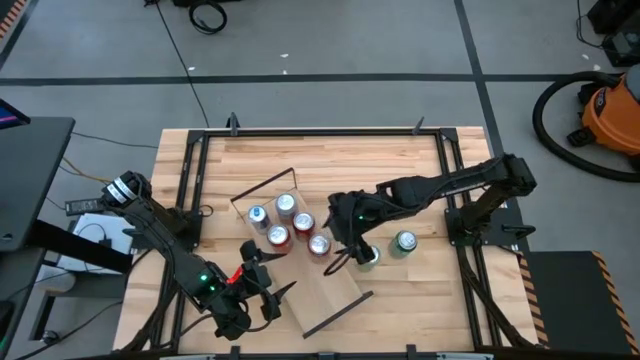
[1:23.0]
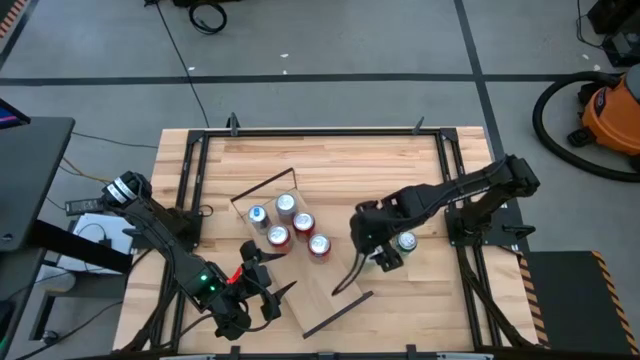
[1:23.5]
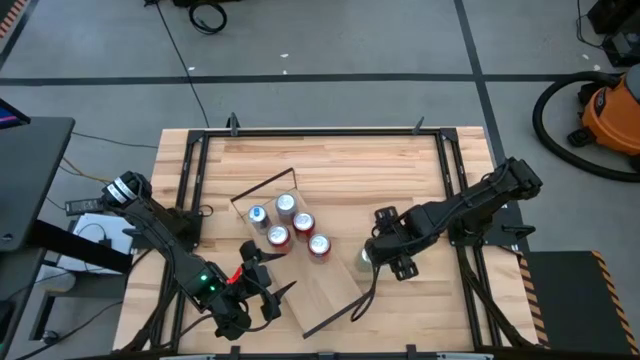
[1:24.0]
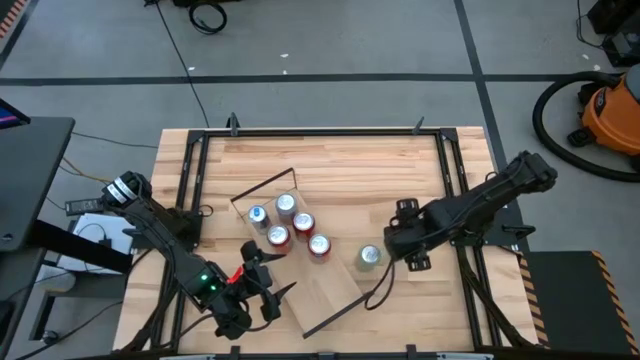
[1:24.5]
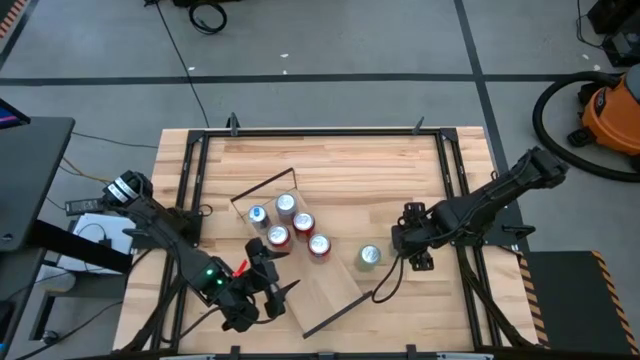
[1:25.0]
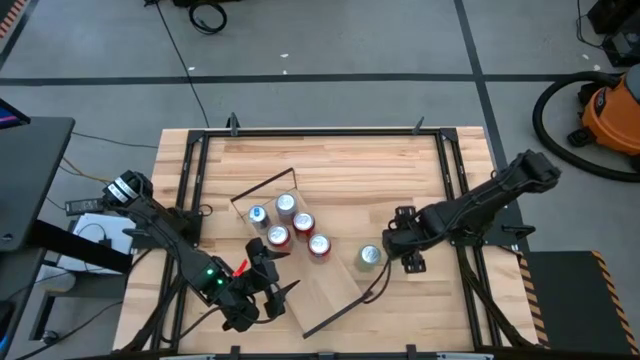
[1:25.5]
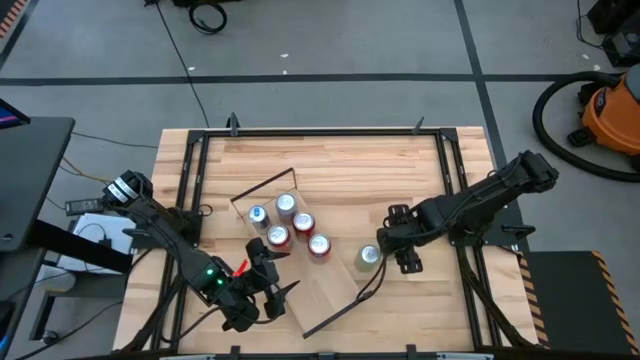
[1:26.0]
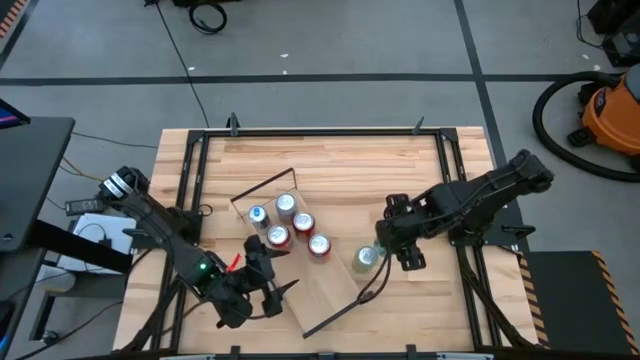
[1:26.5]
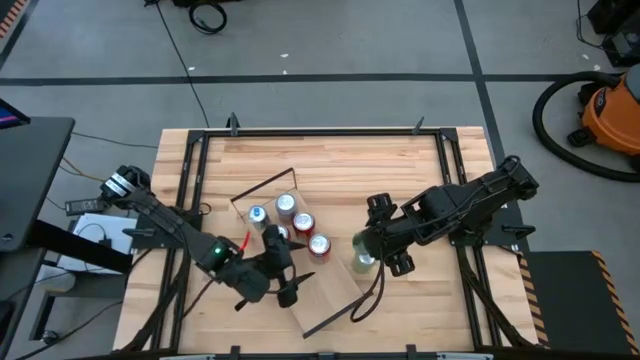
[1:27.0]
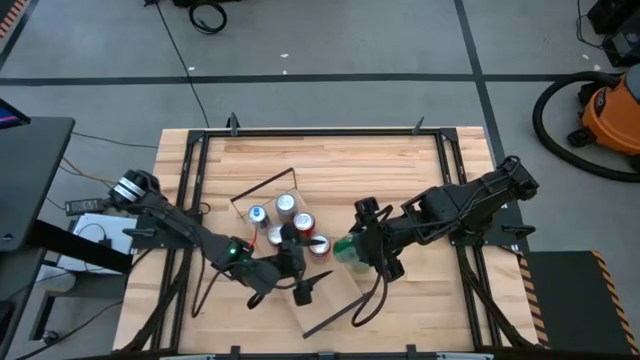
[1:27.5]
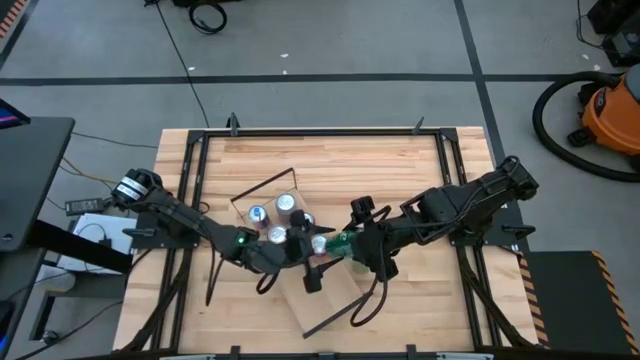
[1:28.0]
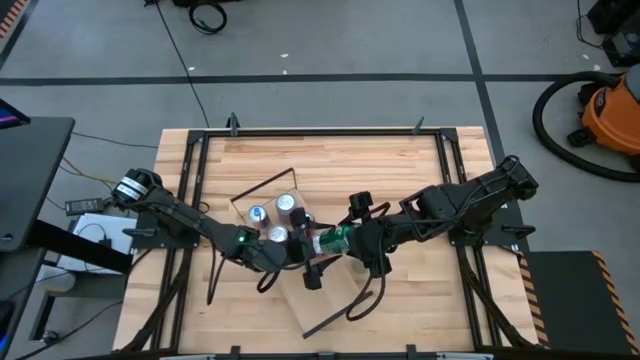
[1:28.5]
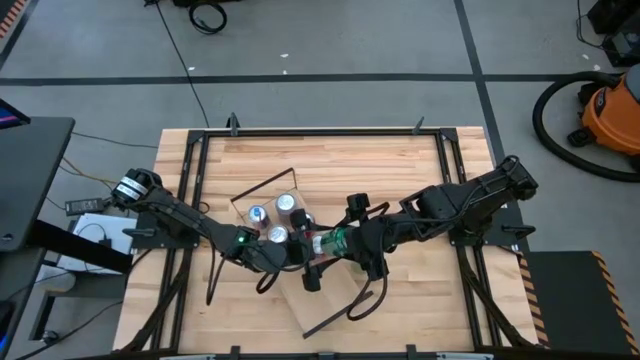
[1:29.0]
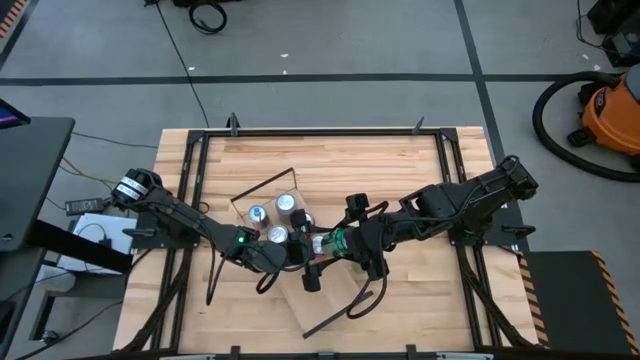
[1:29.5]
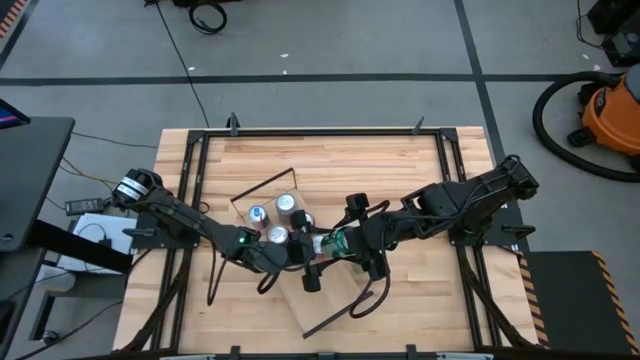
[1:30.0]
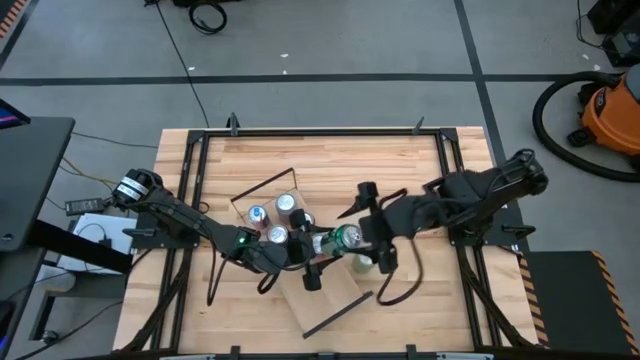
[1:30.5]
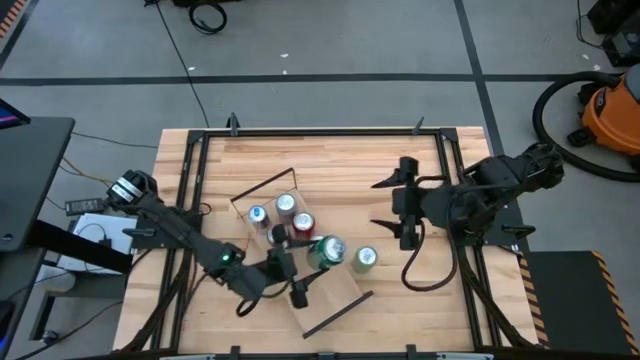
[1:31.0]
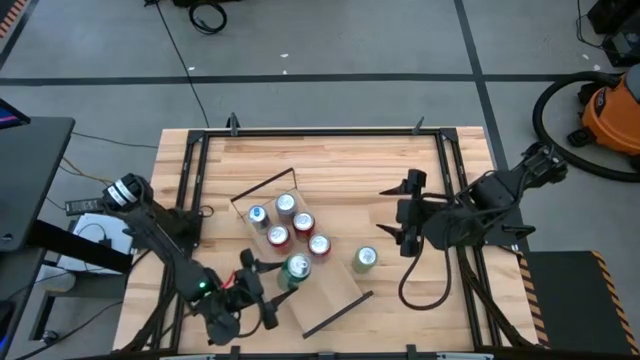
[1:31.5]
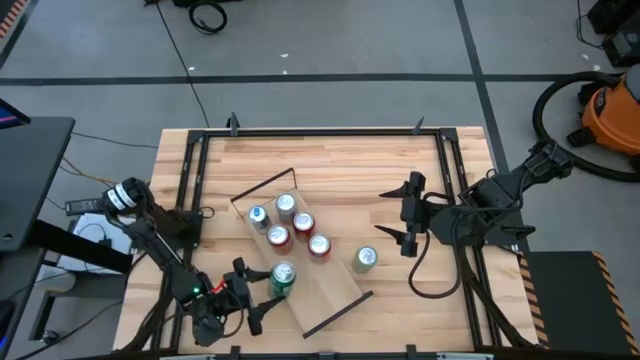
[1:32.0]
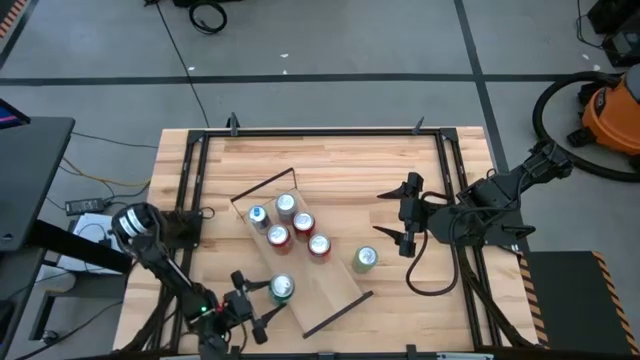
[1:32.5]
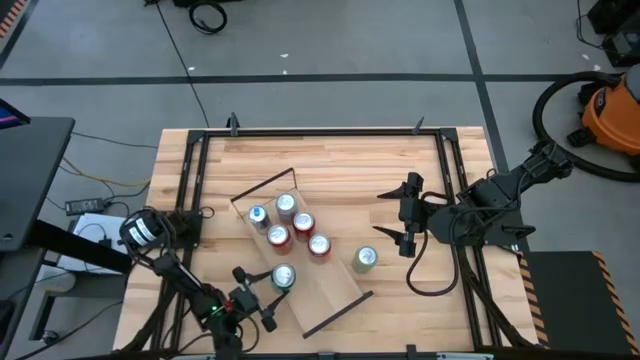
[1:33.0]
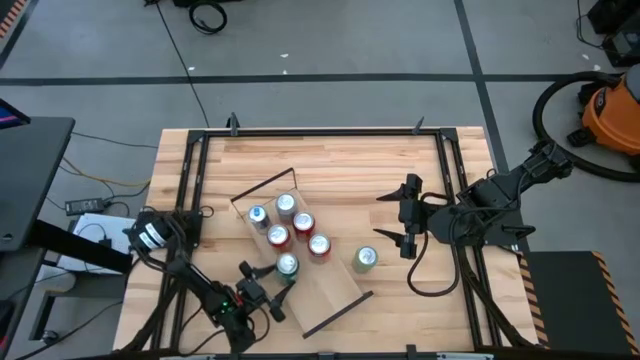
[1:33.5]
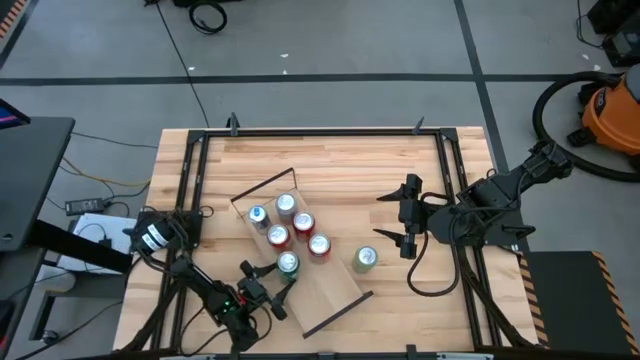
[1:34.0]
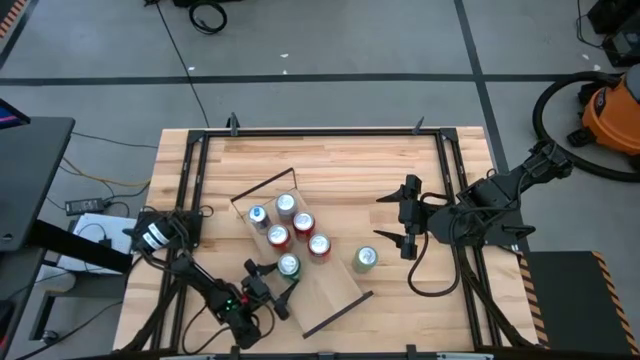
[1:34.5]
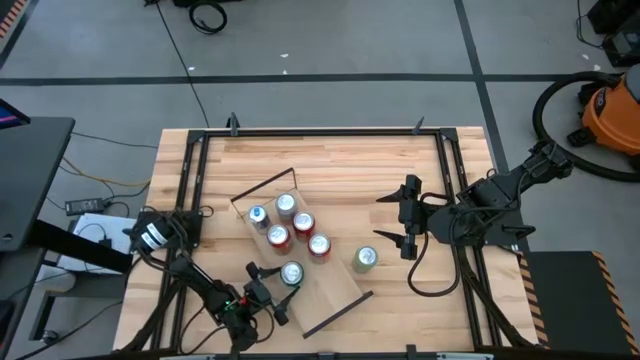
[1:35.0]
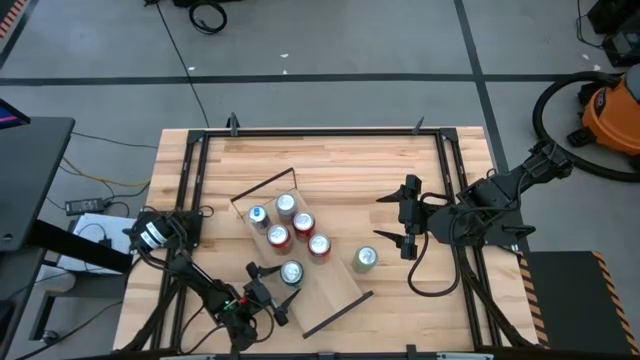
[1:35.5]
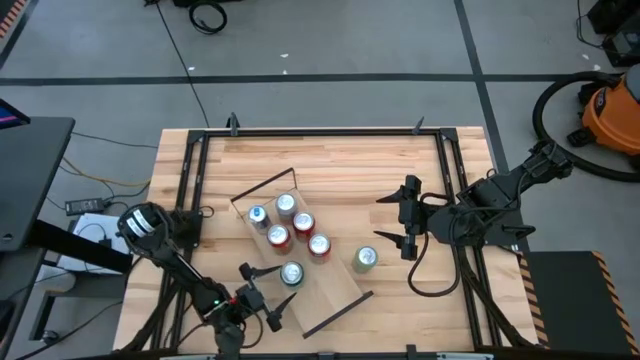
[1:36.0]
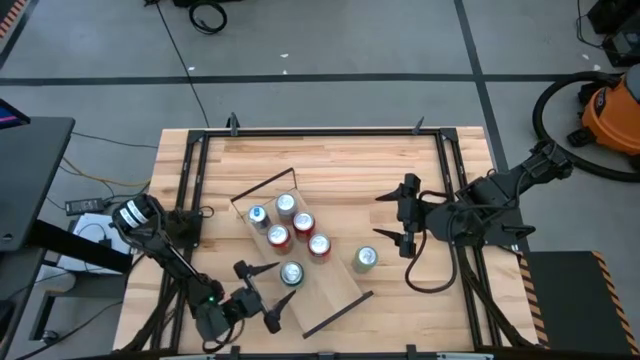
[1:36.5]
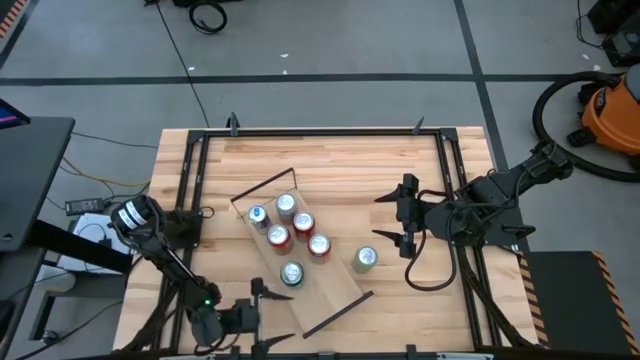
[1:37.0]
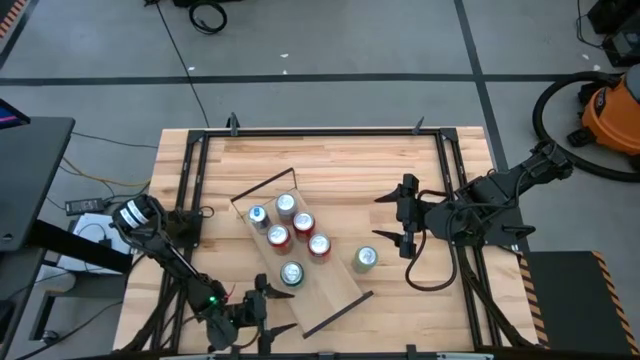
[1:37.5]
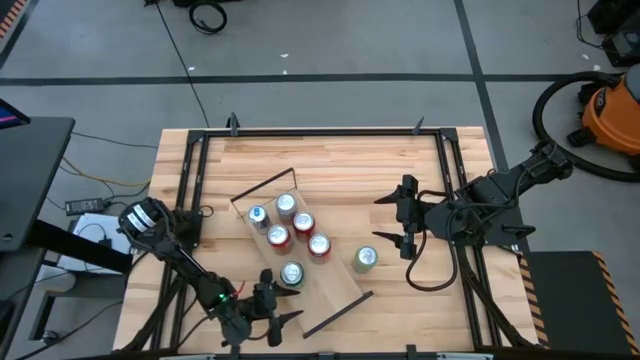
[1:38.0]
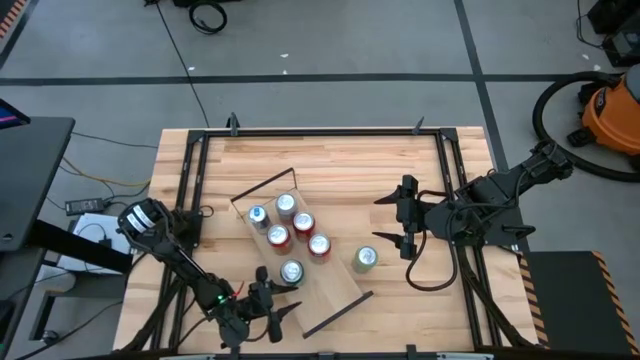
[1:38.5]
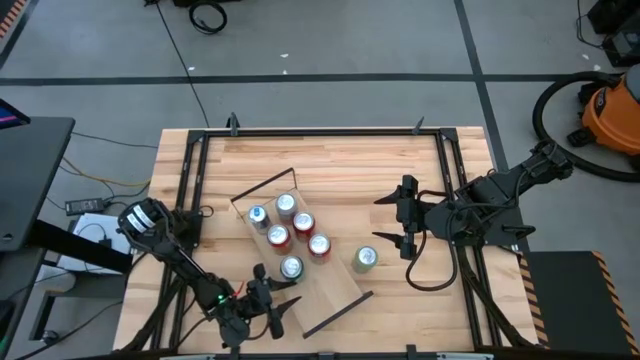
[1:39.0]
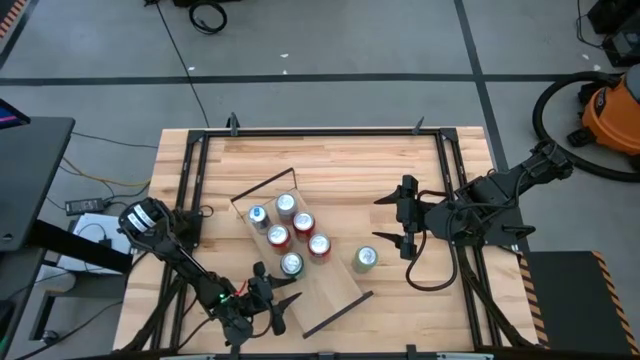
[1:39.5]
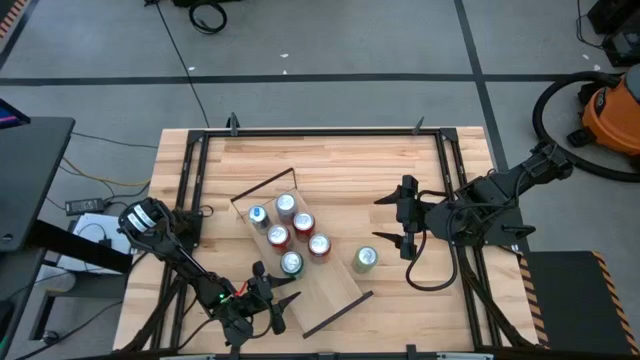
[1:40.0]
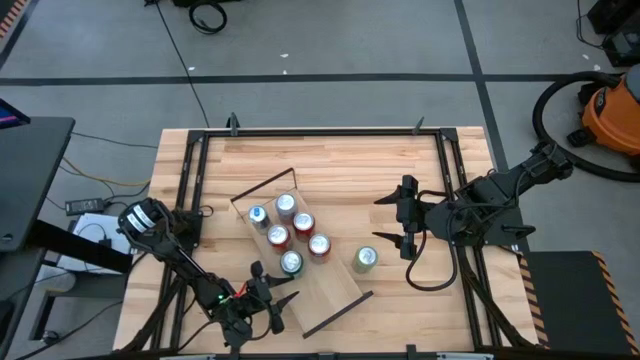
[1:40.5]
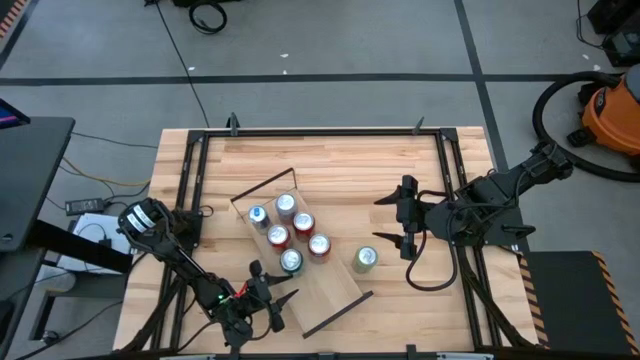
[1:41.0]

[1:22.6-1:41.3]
Task: Place canned beverage on shelf
Put the green soda can on the shelf
